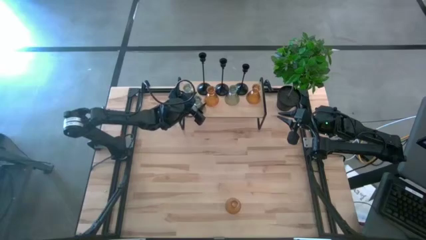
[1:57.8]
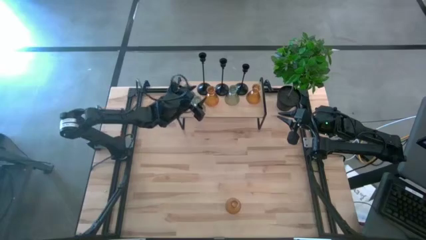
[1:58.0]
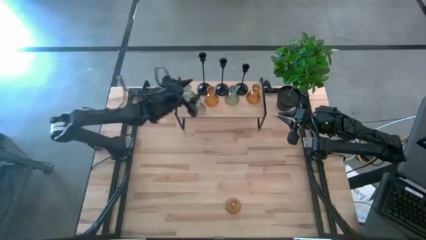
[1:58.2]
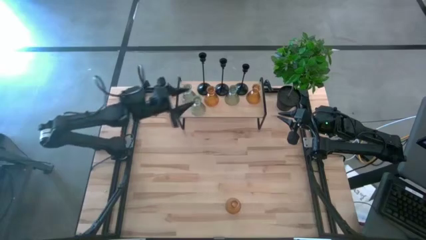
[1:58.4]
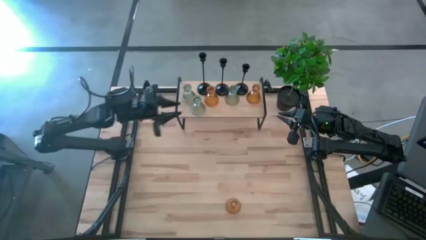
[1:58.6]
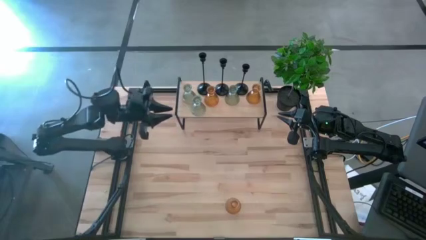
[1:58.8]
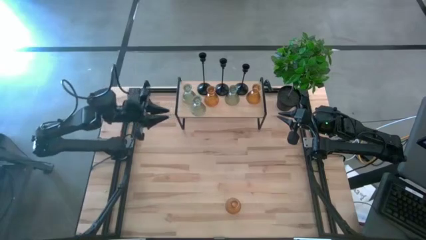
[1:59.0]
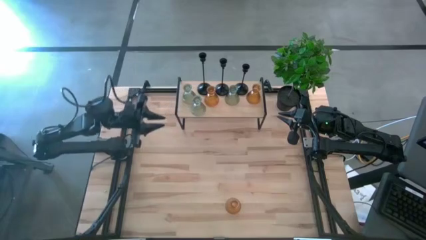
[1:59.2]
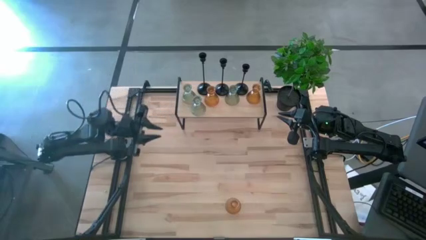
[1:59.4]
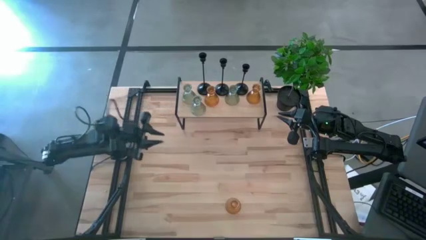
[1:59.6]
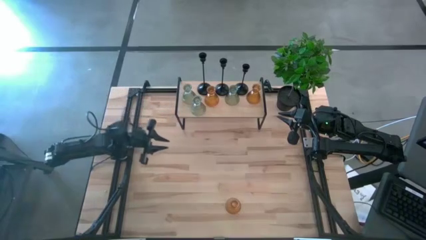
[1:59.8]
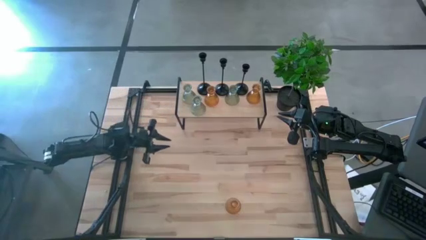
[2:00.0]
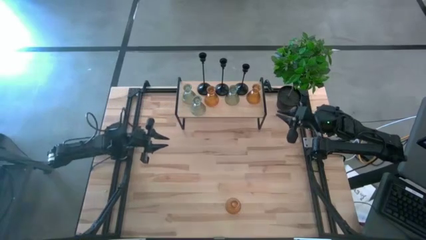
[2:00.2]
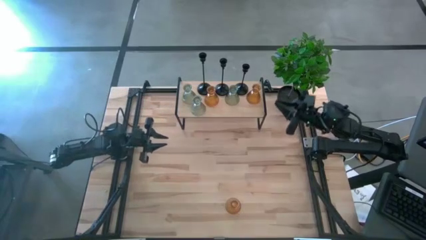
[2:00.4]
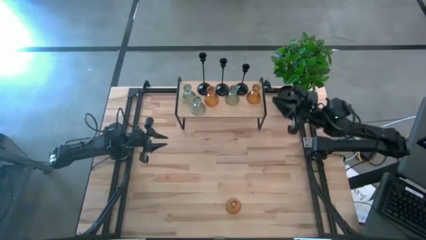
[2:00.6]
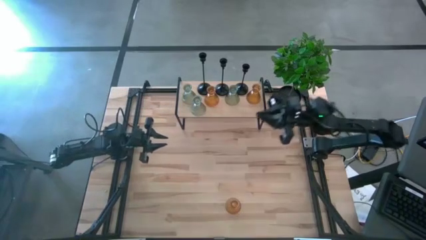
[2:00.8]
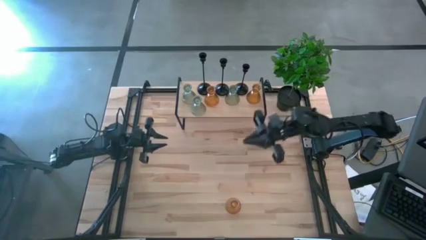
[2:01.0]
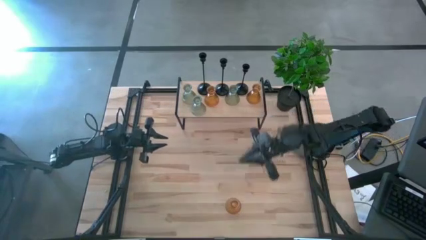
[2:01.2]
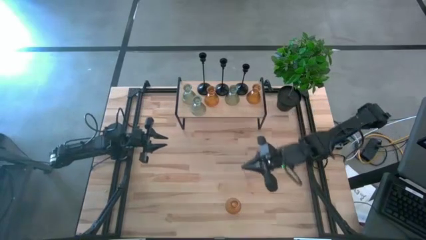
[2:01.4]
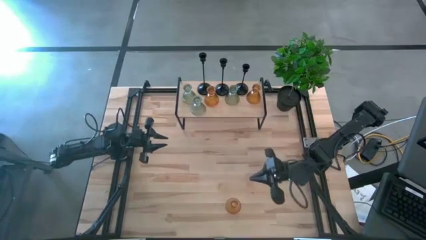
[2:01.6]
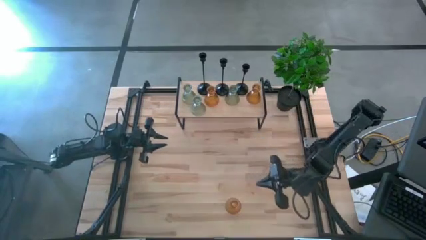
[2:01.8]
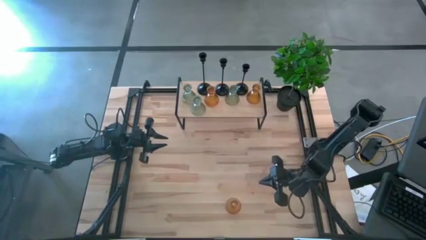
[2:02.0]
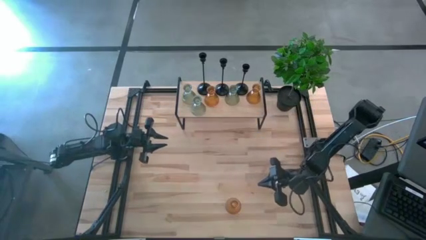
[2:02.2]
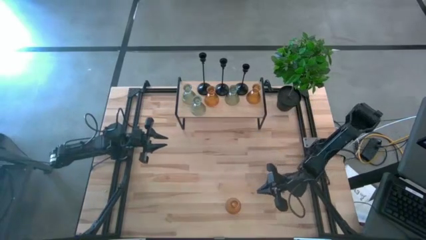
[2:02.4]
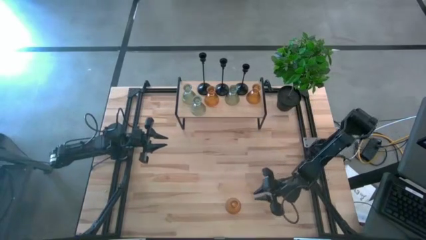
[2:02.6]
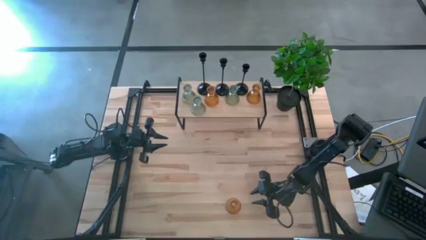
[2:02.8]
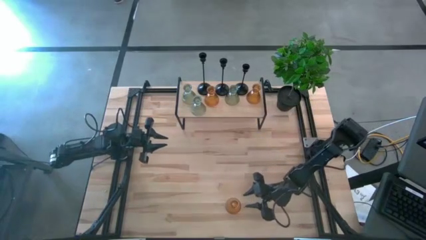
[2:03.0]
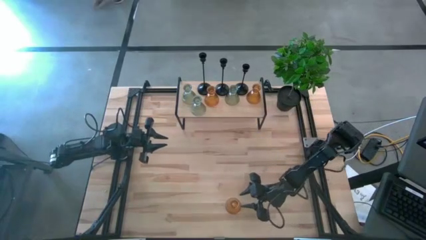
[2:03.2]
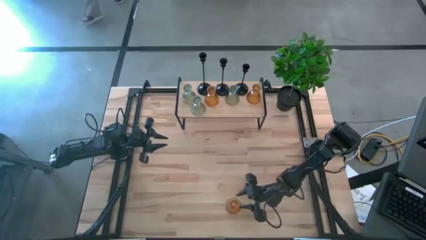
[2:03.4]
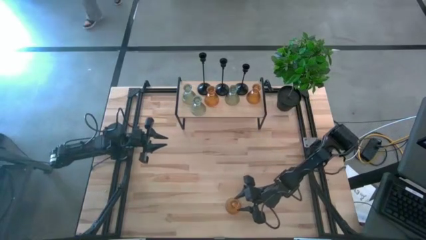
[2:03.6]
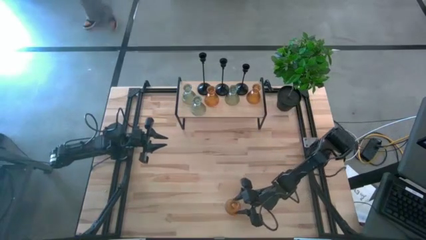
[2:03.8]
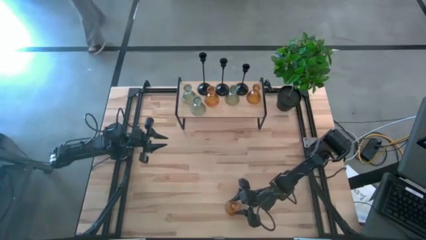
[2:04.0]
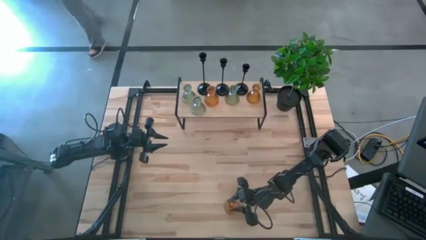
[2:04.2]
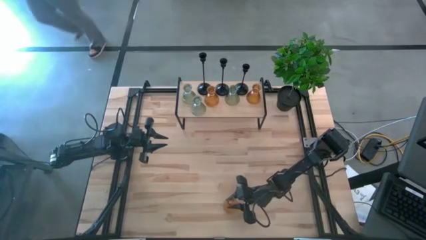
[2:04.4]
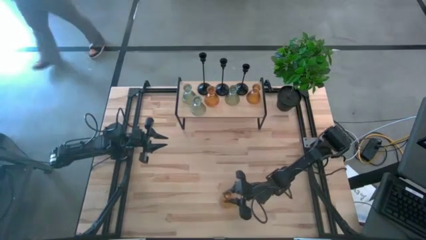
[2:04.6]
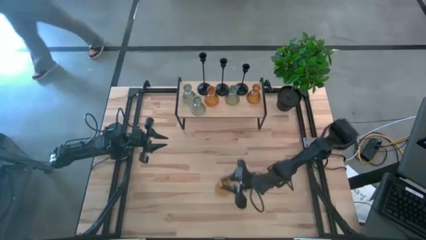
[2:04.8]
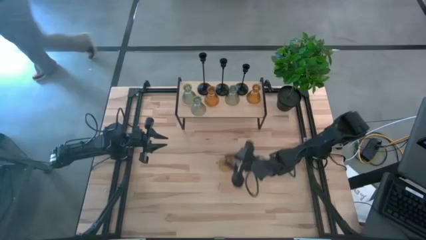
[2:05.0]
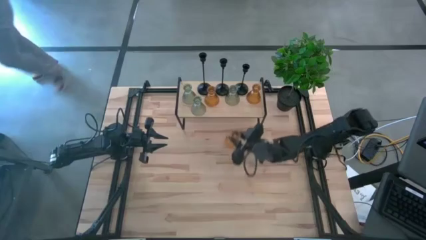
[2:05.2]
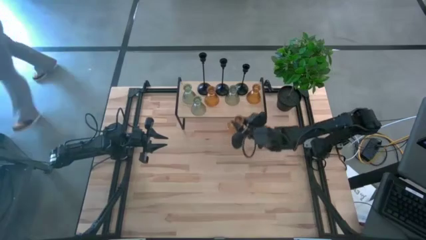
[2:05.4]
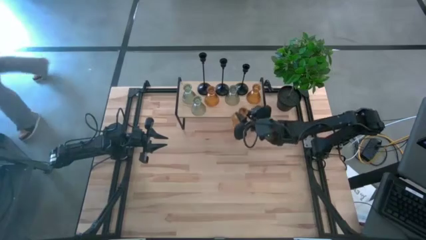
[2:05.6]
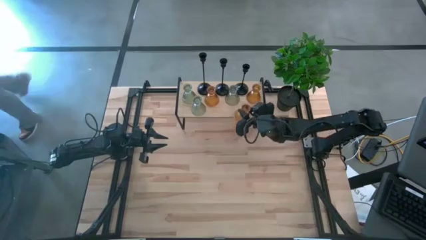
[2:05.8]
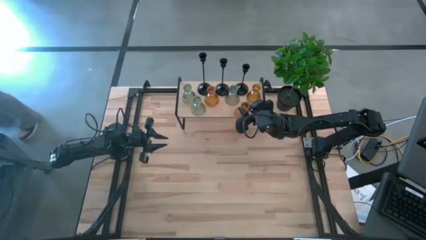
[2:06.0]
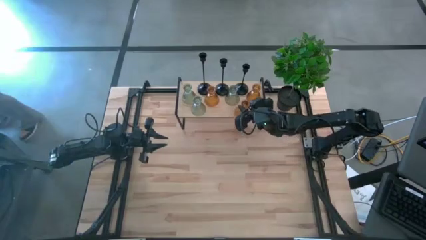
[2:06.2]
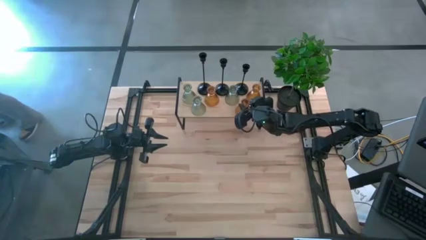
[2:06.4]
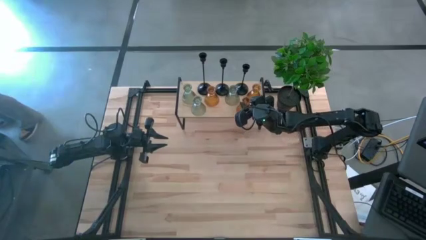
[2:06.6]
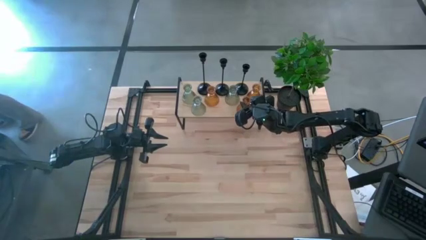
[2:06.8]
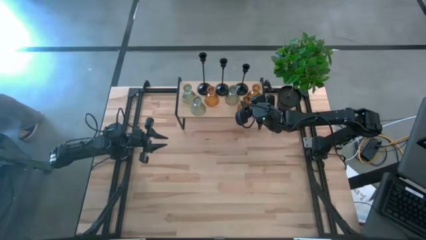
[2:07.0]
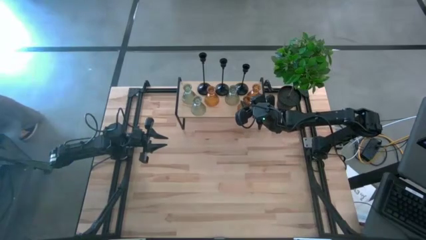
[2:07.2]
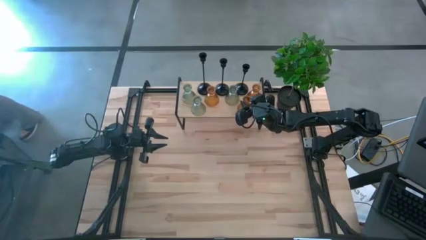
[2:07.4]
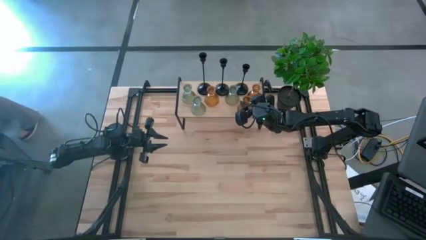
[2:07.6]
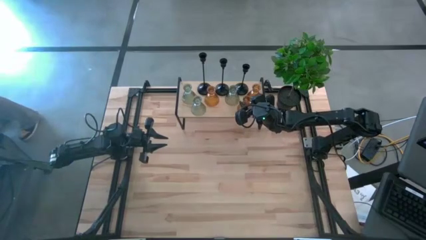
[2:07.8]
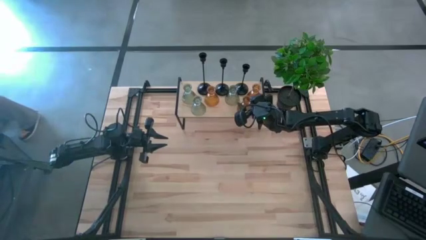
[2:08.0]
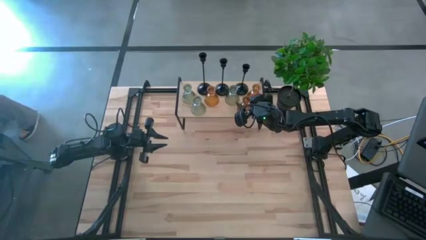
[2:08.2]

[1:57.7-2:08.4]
Task: Pick & Place candle stick holders
Put the yellow candle holder on the shelf

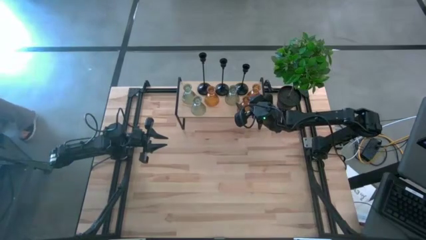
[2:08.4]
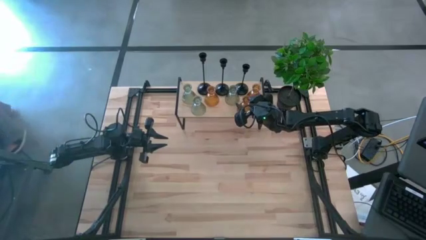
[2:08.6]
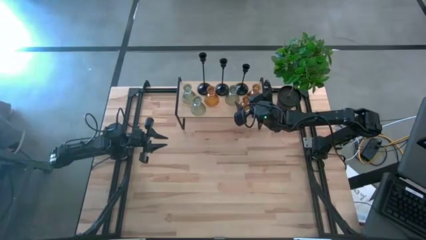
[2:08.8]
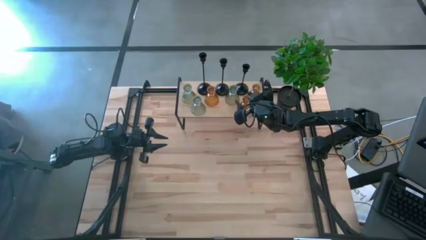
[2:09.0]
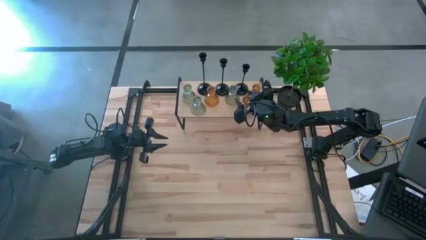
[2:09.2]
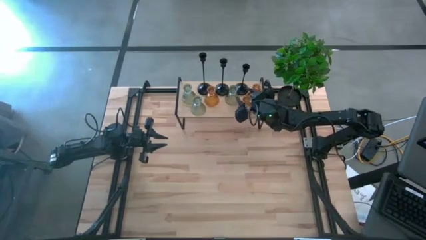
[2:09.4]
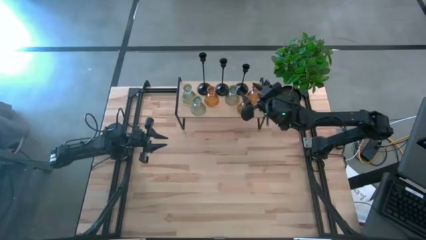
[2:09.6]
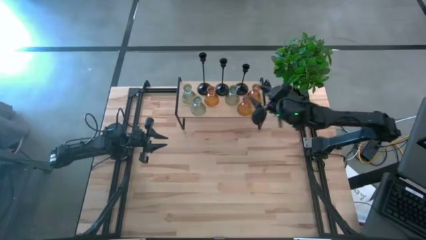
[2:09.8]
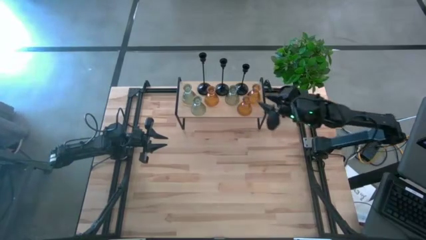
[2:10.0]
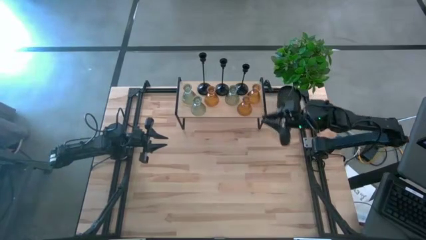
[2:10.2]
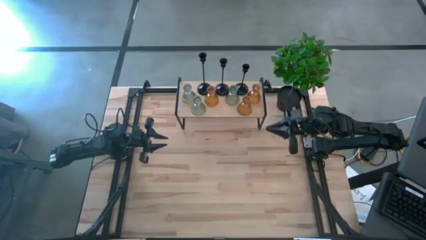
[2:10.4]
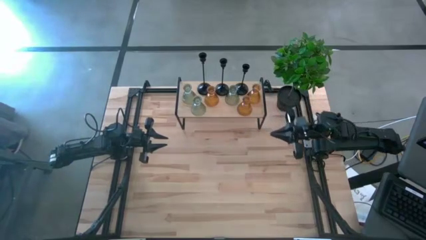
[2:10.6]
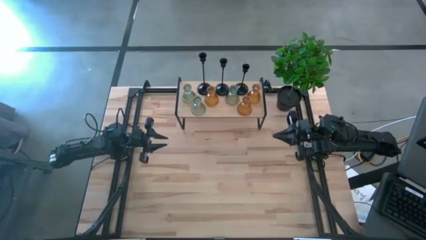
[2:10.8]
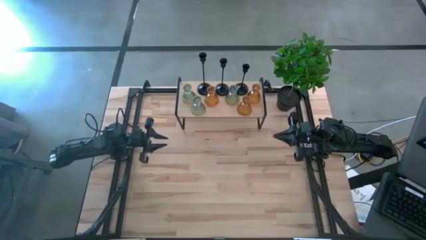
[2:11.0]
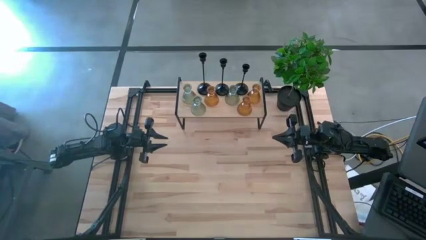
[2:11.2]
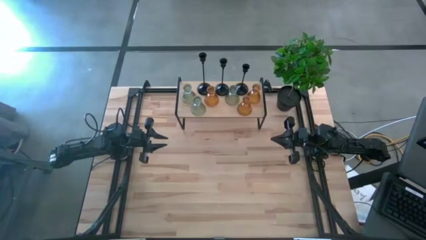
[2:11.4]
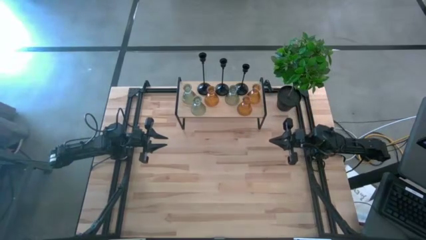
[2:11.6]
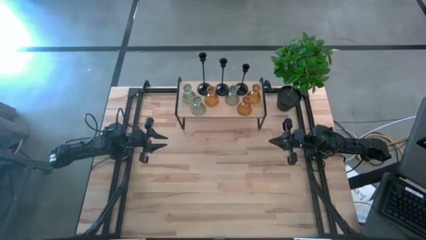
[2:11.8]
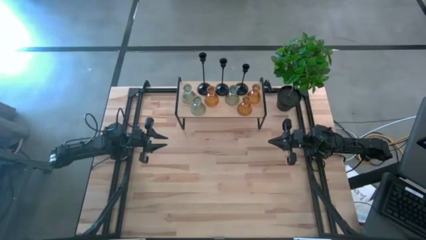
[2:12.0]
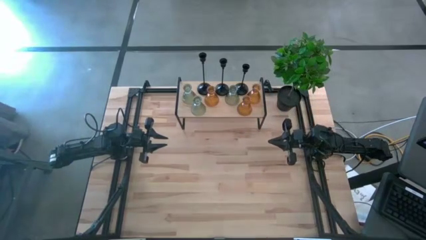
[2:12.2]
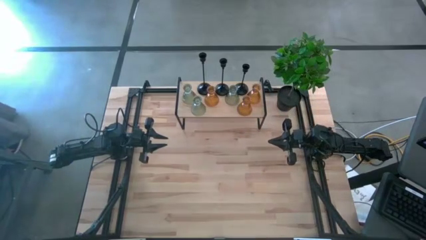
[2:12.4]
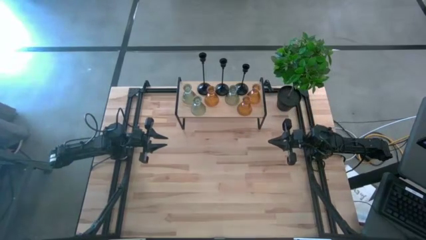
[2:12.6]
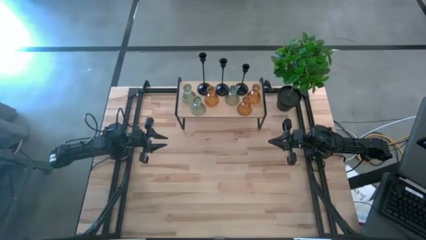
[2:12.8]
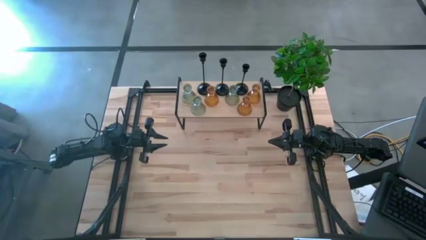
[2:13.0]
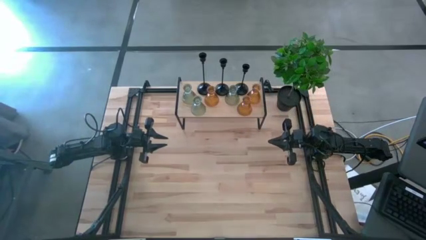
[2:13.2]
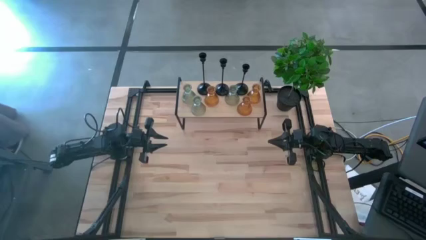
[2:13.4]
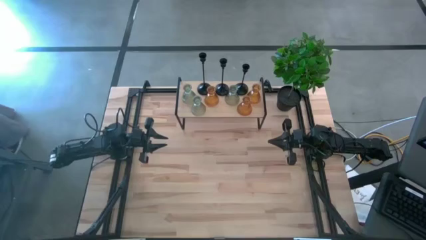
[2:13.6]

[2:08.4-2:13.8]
Return to Home Position

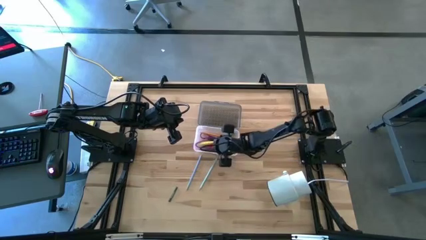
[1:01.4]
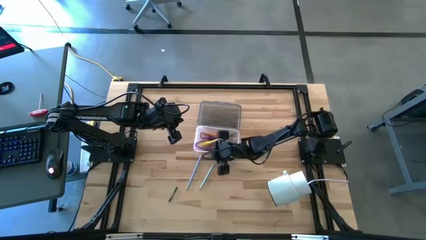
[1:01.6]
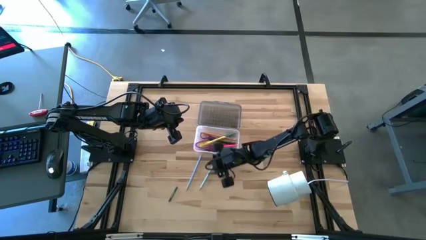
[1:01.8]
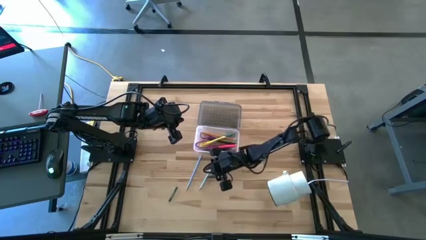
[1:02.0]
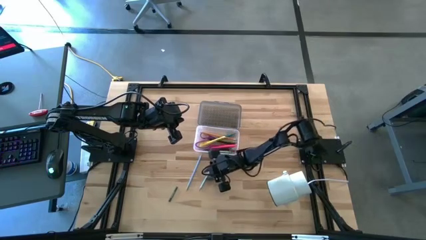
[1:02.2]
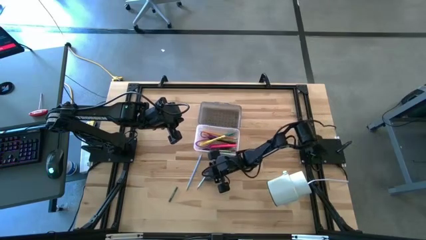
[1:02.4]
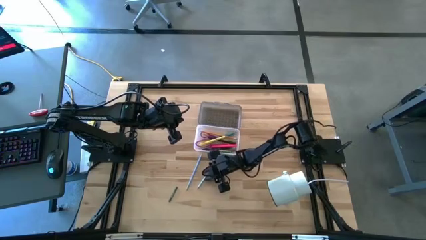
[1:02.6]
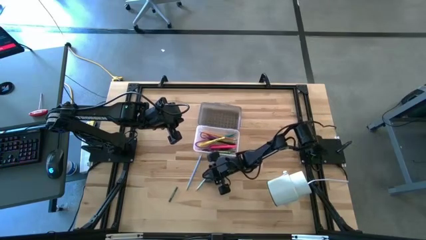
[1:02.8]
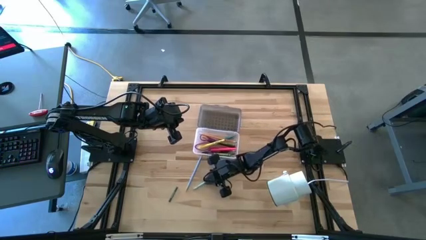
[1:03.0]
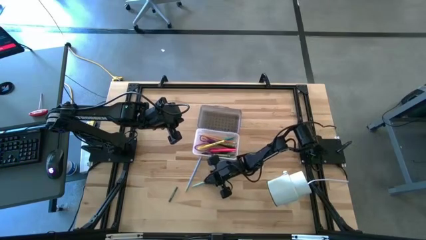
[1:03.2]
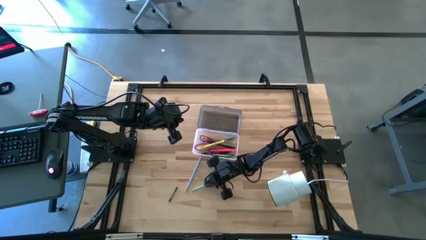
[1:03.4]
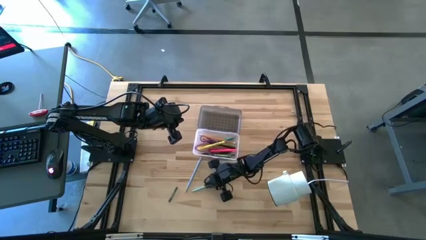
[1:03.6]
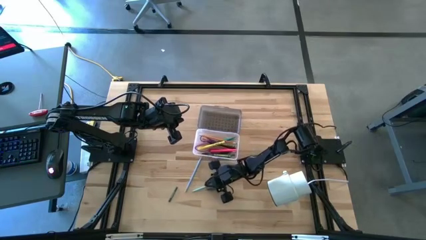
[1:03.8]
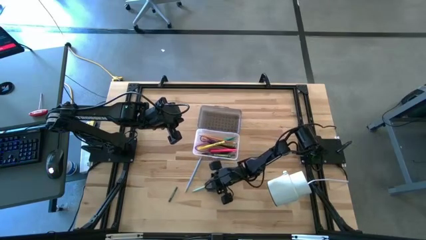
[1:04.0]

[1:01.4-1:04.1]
Task: Pick & place school supplies into a supply box
Put the green pencil into the black supply box
